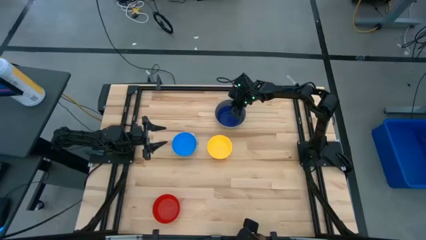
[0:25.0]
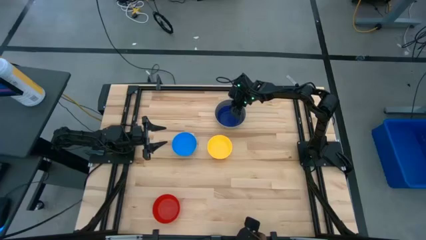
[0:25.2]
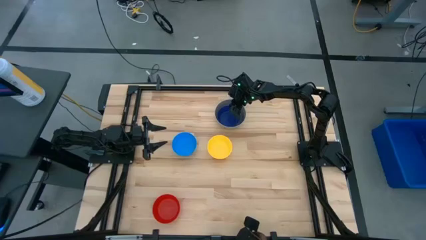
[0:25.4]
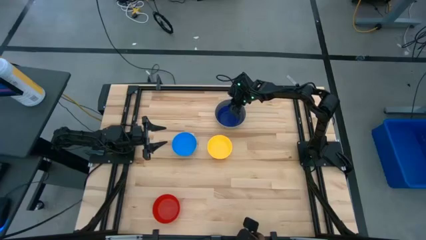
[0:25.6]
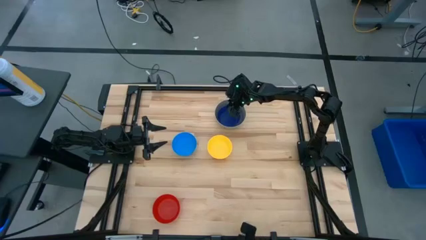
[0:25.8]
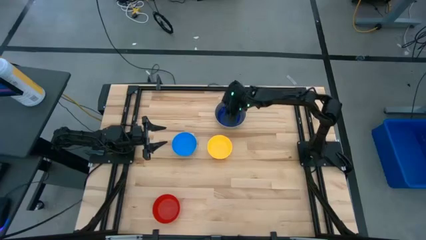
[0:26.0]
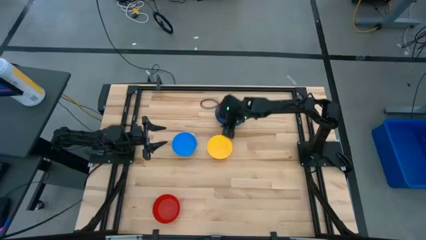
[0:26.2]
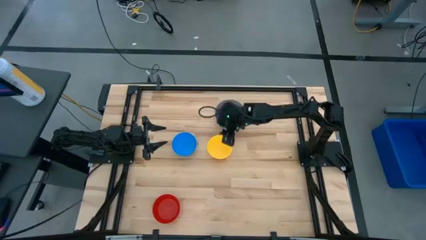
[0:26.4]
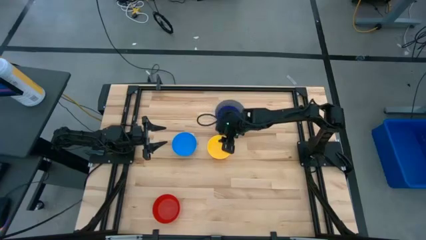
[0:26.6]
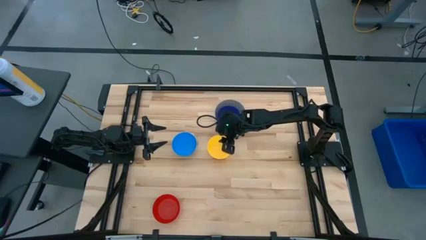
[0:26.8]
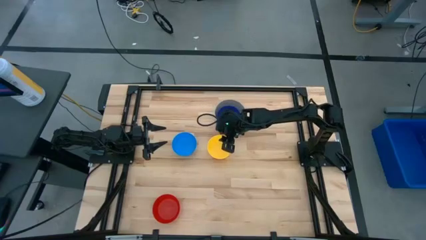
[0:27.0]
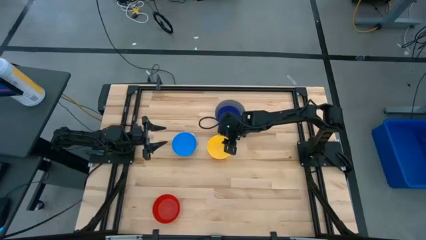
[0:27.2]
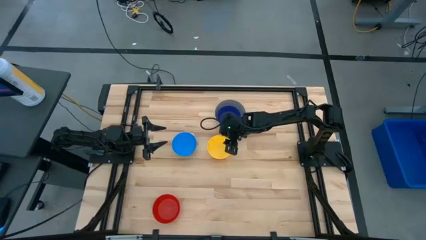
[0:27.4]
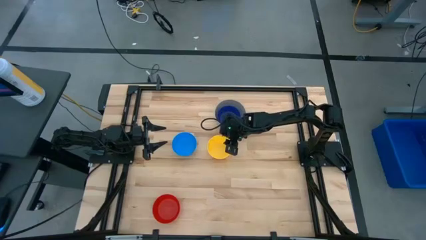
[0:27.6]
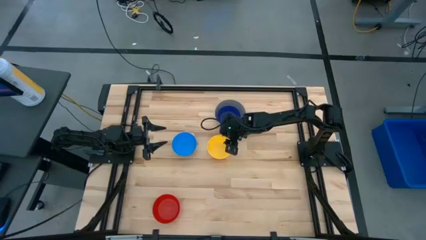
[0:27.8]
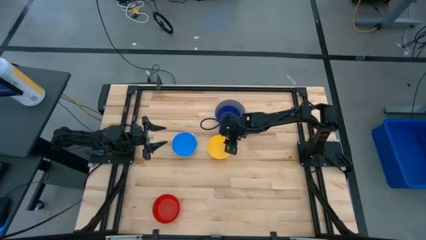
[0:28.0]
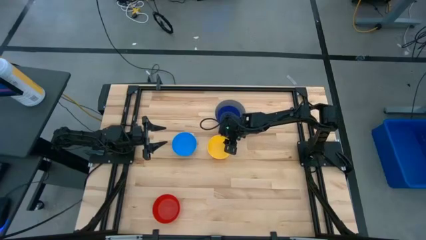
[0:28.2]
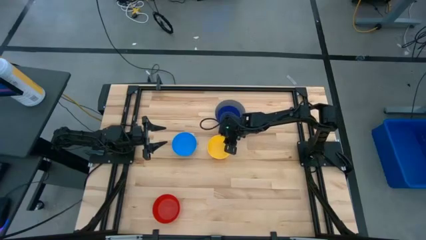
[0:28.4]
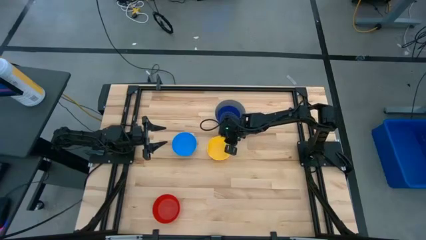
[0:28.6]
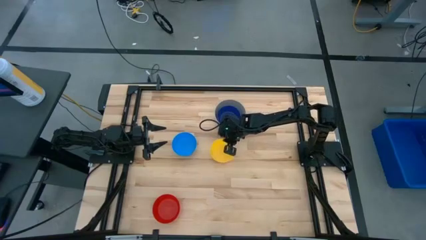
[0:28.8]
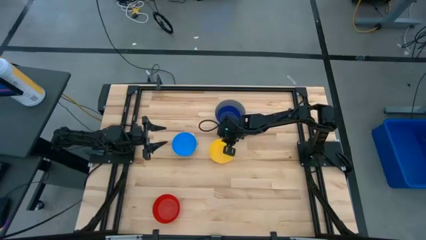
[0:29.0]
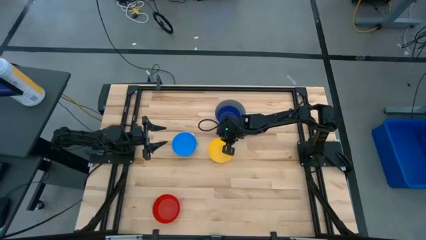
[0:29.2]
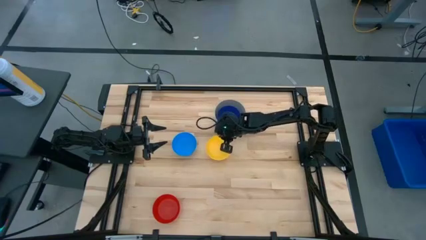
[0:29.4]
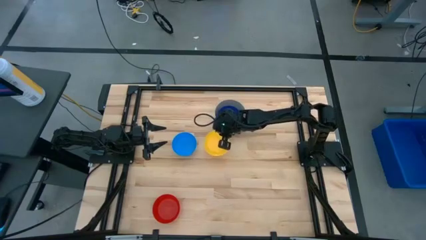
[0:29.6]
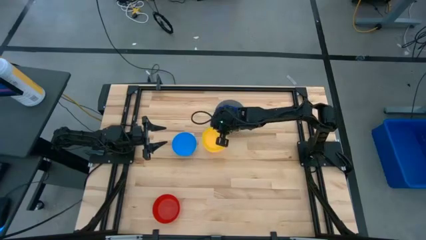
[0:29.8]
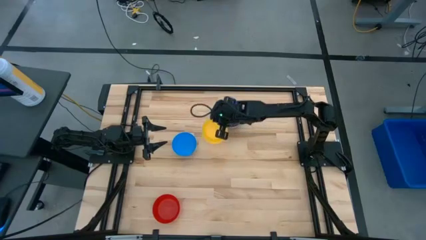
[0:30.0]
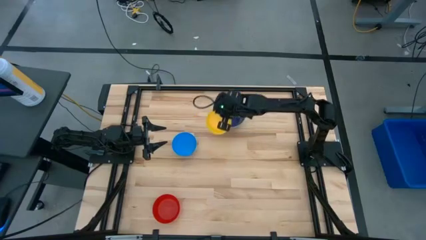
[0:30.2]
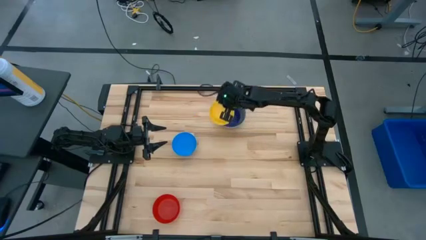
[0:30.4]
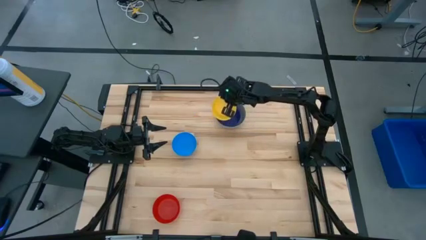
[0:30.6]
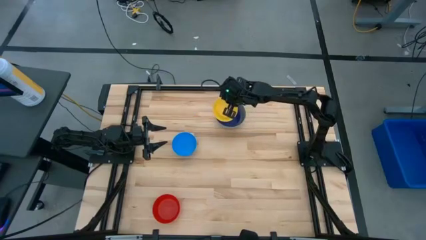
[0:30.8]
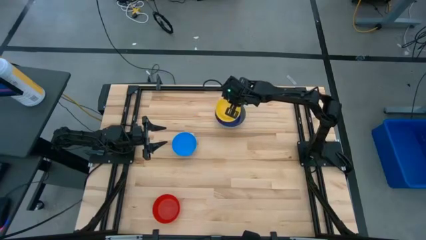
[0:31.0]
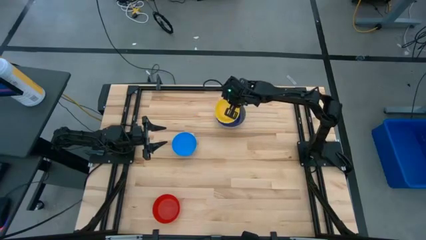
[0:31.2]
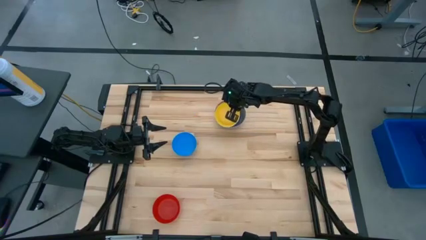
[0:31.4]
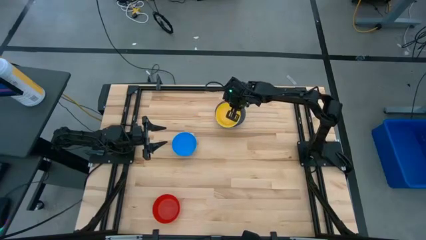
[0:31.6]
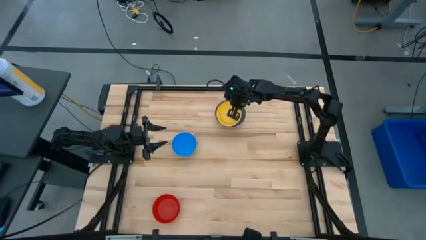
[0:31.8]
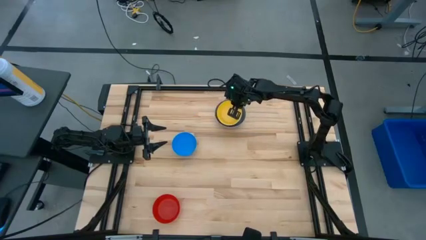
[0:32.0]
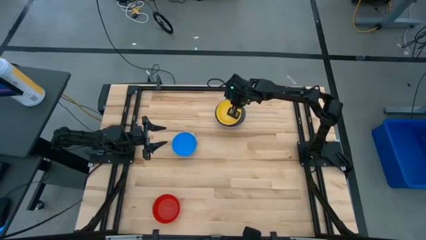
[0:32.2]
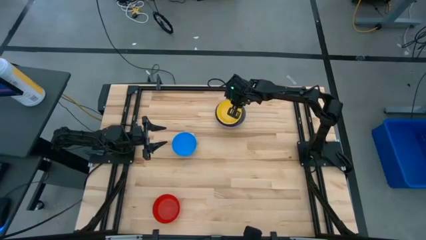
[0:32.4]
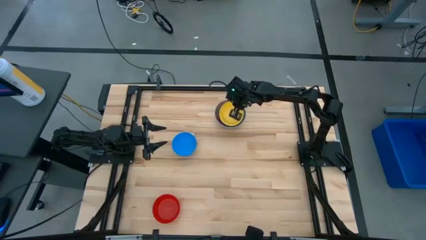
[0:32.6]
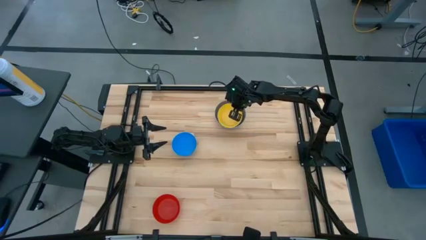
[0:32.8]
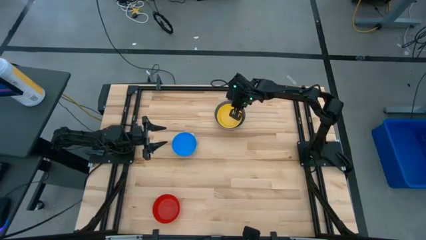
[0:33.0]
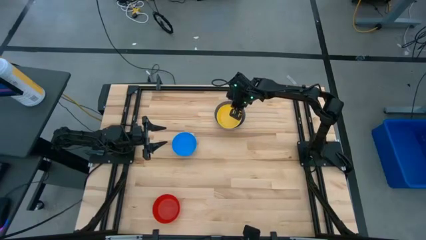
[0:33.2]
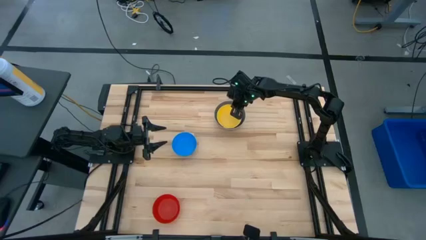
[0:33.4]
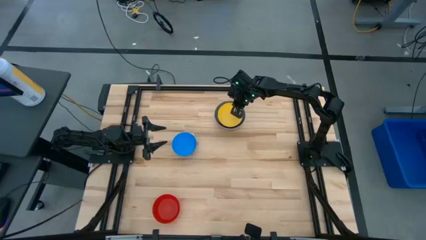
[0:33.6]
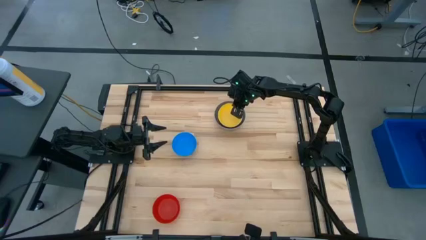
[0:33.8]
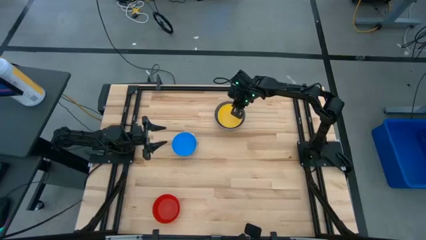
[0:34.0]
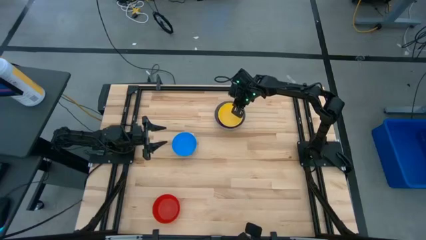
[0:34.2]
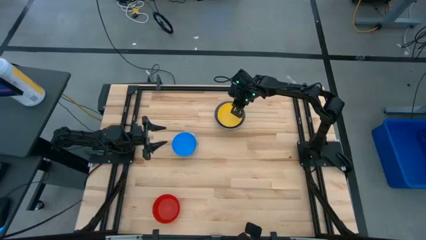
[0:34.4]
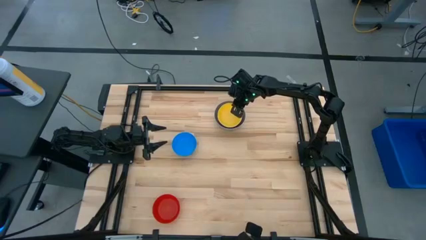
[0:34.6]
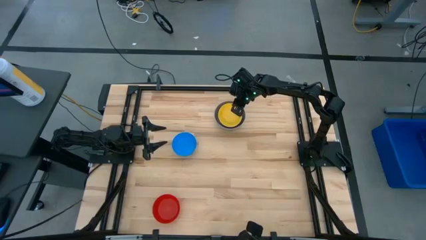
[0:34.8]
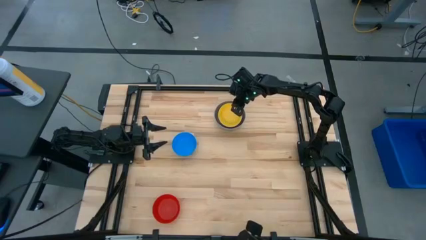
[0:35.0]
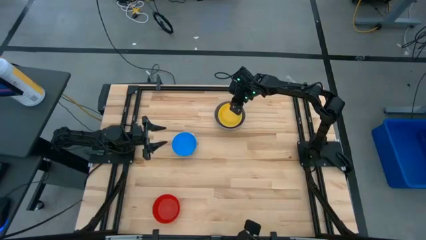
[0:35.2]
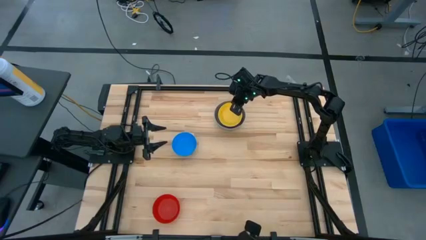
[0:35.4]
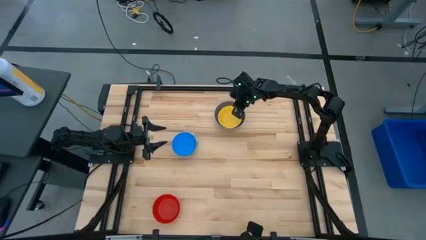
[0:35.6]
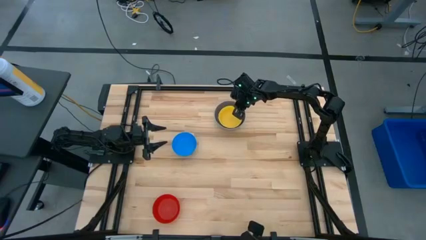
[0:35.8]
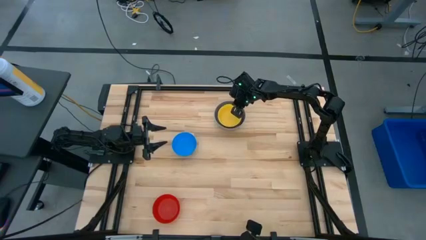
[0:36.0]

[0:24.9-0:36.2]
Stack the yellow bowl on the dark blue bowl

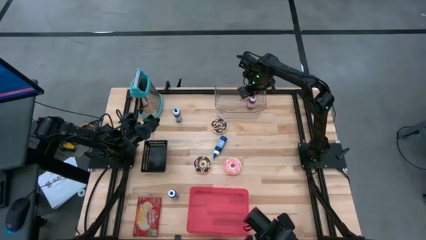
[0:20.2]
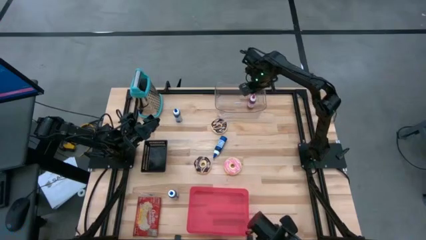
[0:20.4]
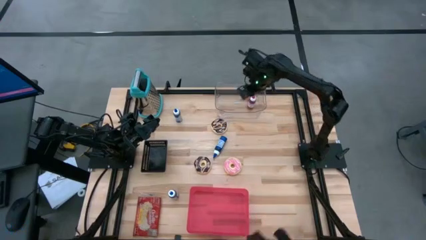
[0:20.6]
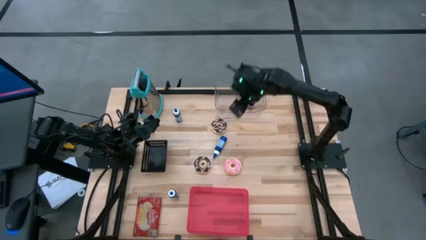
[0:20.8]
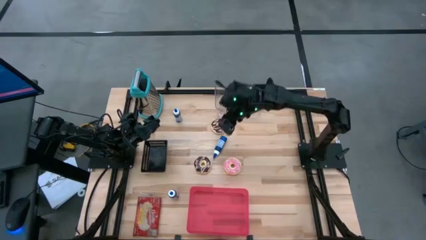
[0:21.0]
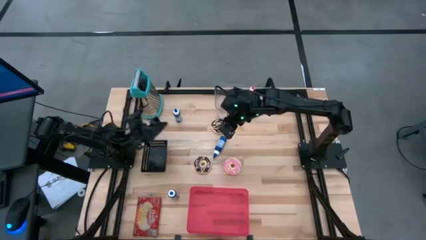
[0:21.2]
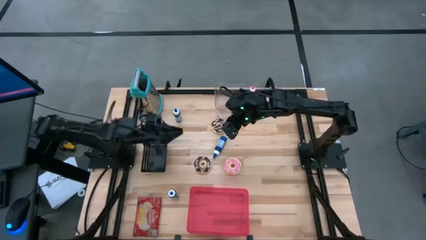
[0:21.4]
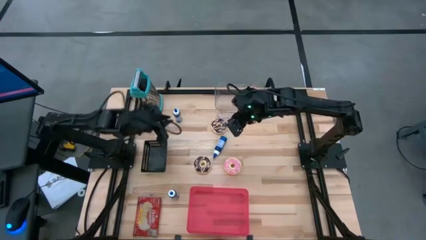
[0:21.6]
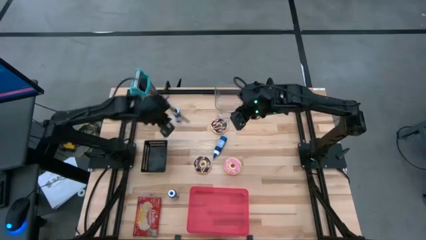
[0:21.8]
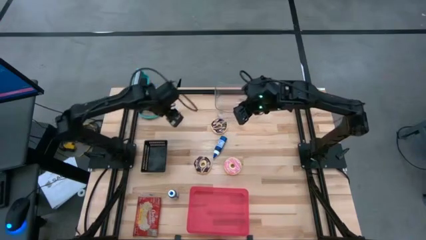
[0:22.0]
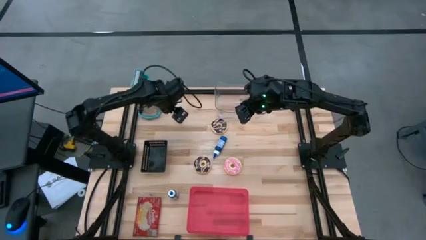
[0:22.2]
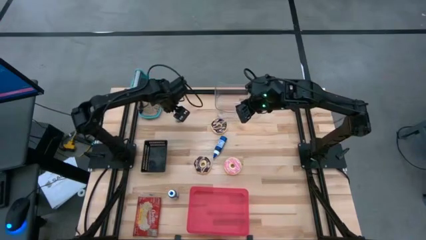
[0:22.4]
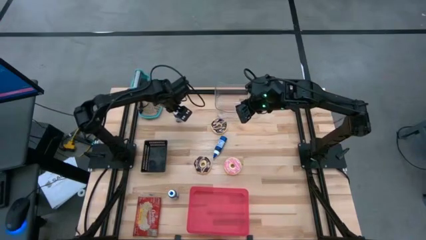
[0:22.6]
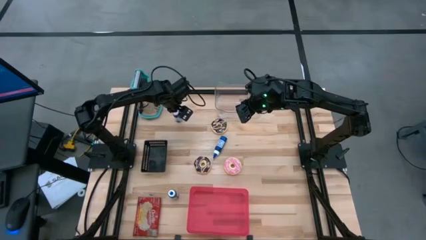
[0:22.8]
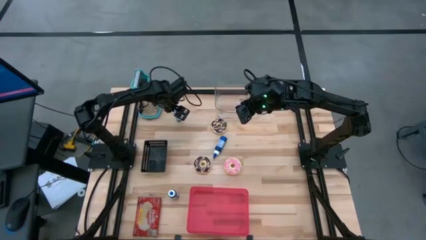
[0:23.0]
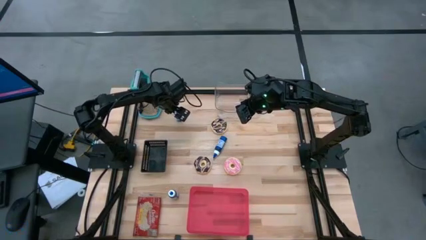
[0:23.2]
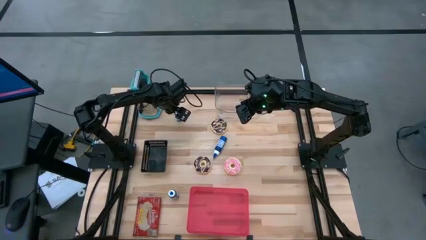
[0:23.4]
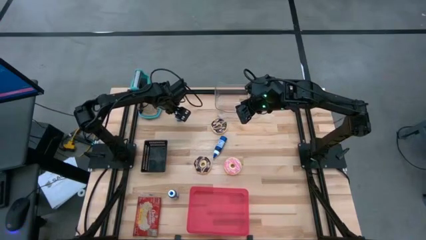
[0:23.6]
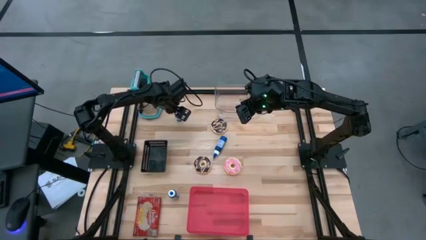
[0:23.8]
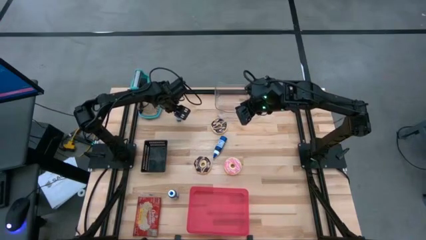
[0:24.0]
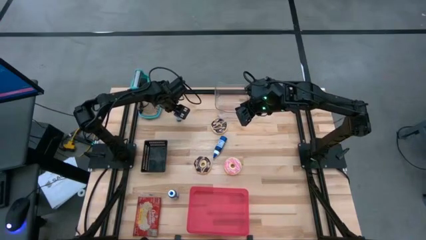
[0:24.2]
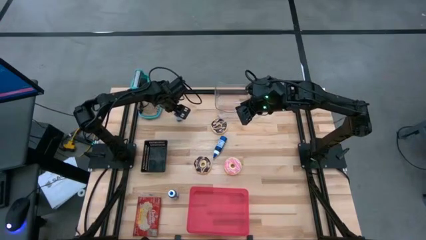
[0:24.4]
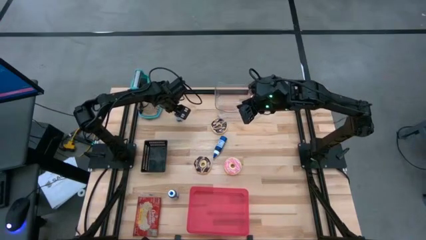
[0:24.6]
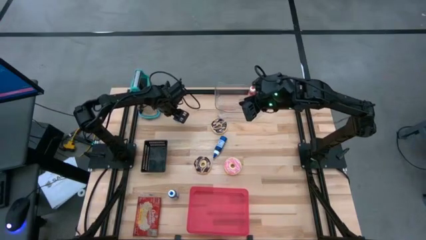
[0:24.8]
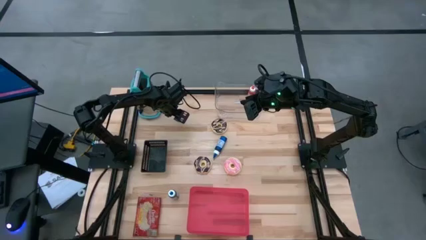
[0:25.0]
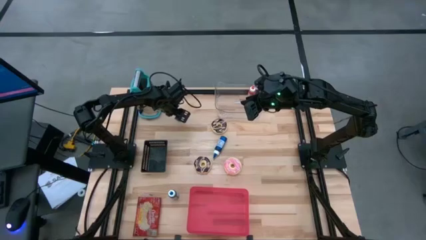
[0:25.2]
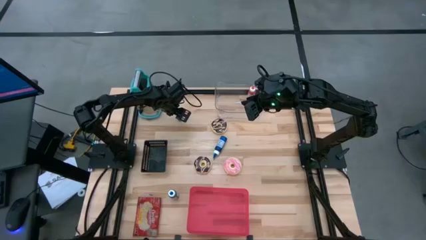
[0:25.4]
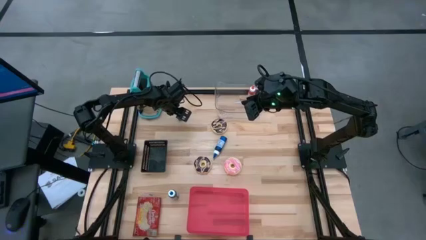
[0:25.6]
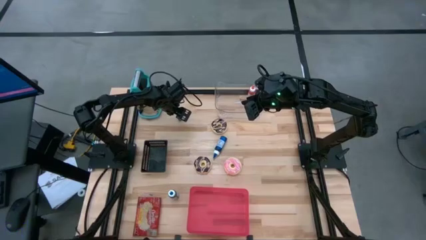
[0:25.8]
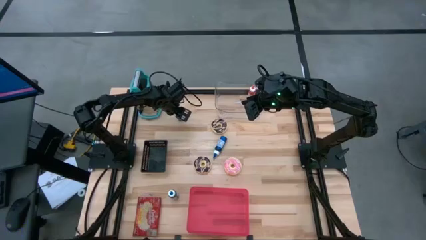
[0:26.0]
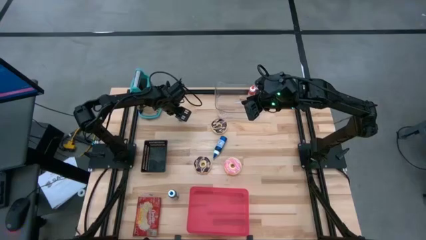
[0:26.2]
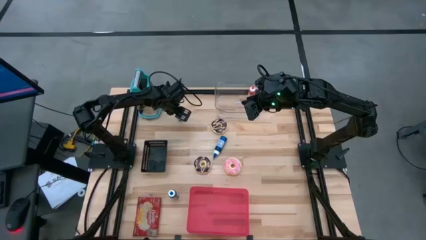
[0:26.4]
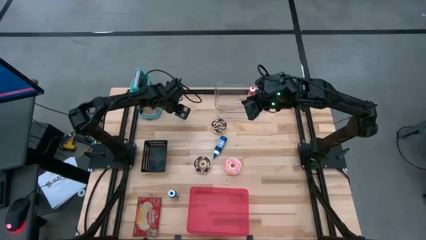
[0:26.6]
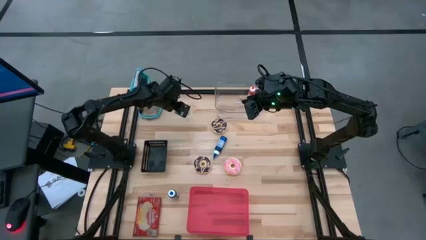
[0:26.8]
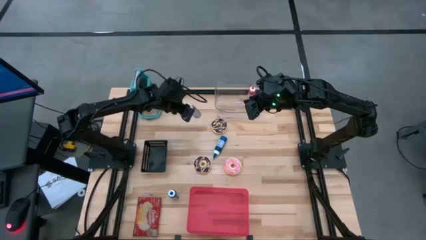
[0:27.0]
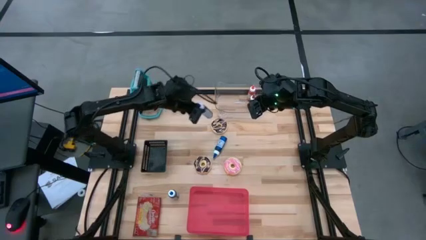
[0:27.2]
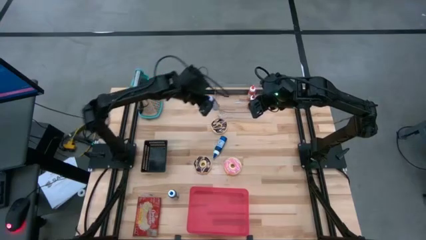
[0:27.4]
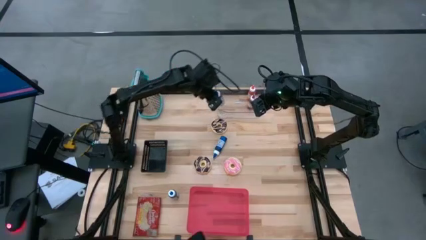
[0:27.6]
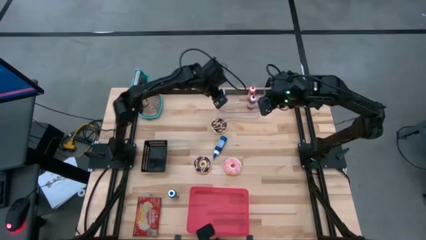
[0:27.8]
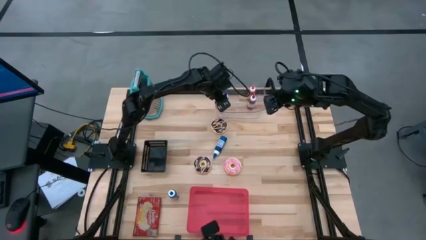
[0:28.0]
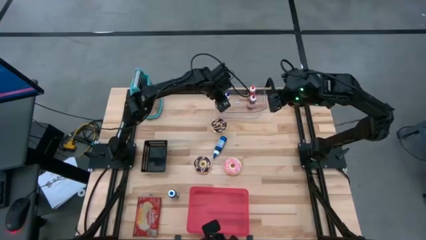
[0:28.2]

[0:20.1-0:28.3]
Put the top left blue food coloring bottle into the transparent bin
